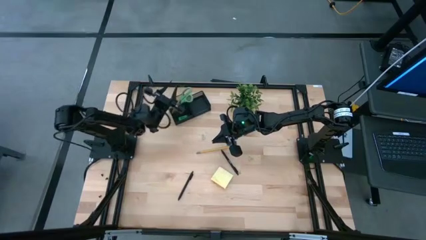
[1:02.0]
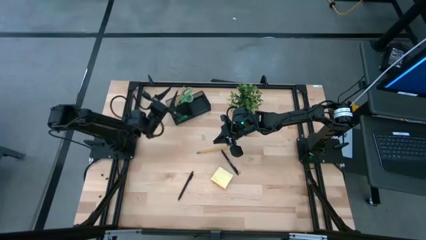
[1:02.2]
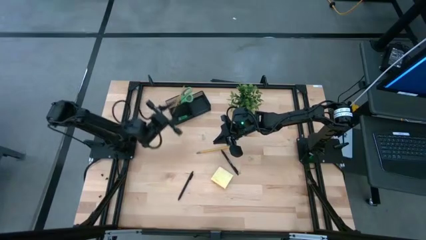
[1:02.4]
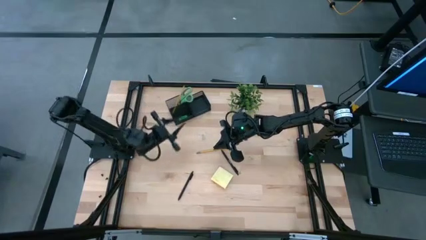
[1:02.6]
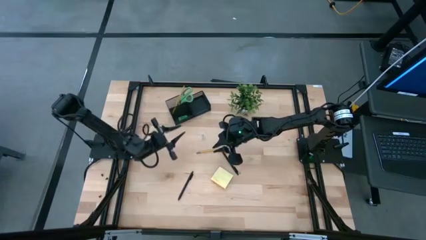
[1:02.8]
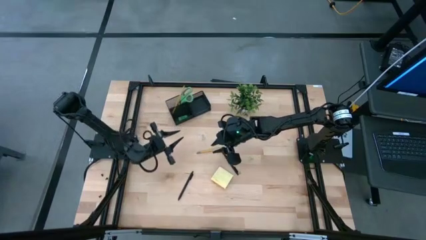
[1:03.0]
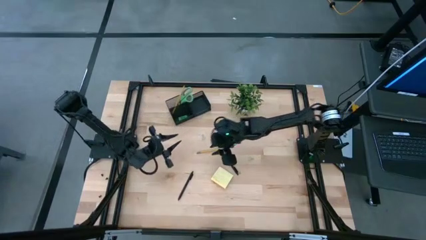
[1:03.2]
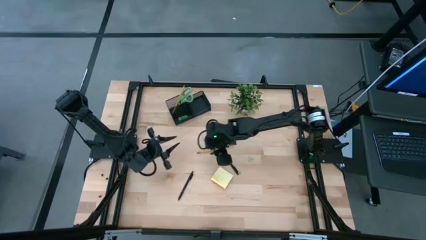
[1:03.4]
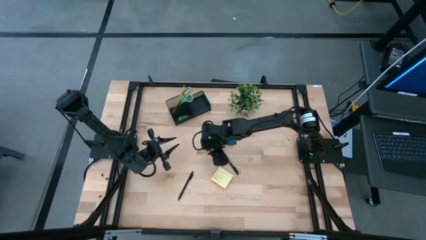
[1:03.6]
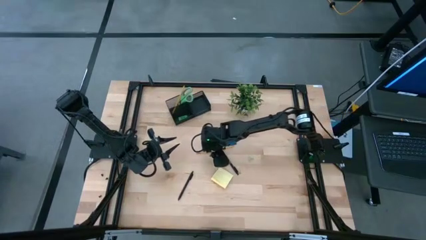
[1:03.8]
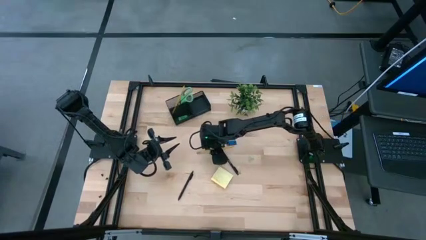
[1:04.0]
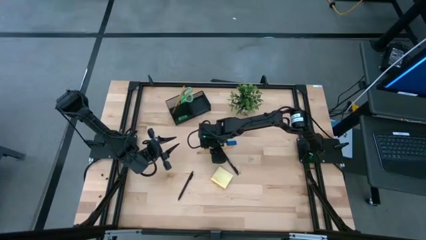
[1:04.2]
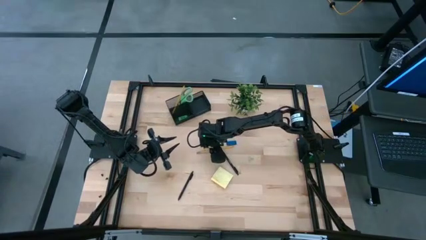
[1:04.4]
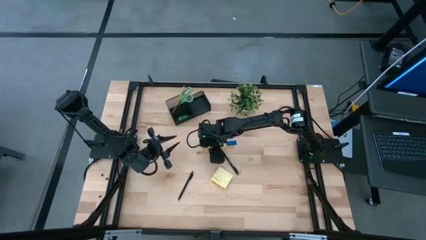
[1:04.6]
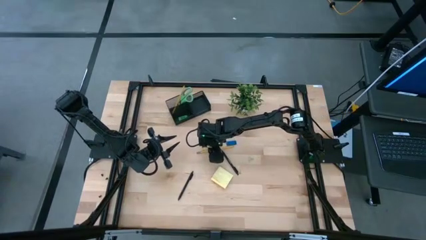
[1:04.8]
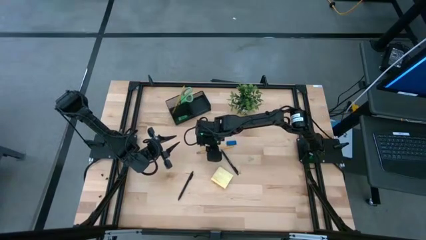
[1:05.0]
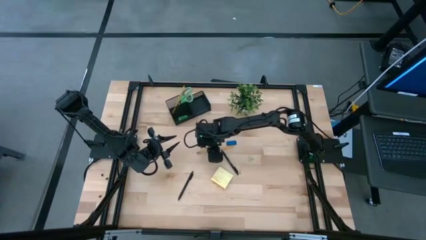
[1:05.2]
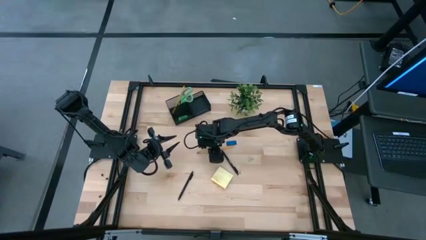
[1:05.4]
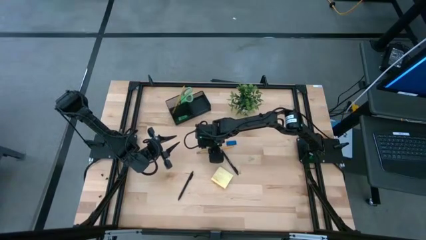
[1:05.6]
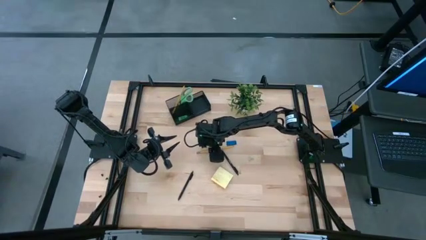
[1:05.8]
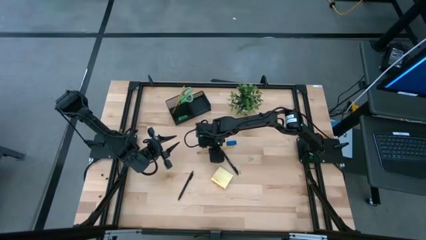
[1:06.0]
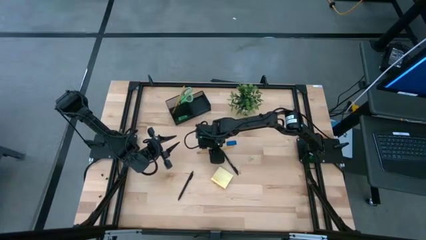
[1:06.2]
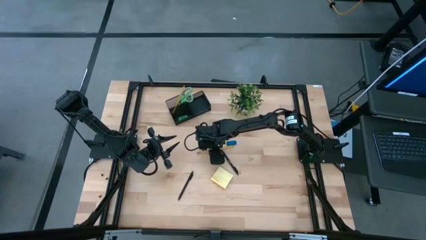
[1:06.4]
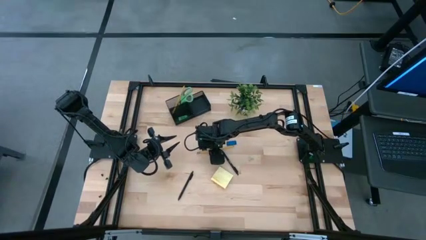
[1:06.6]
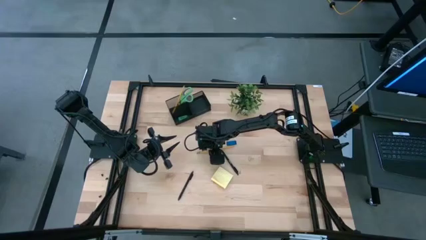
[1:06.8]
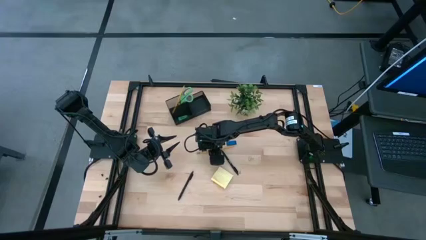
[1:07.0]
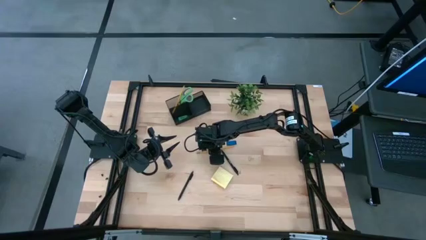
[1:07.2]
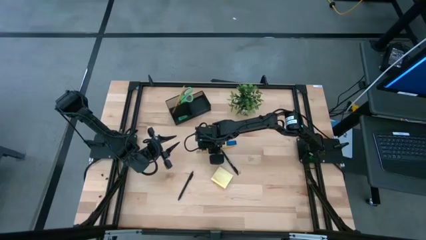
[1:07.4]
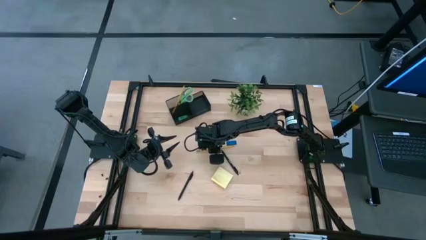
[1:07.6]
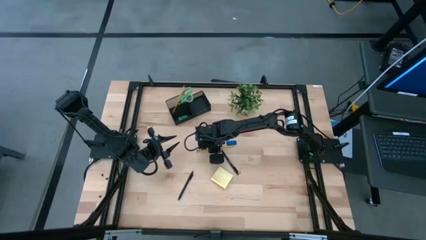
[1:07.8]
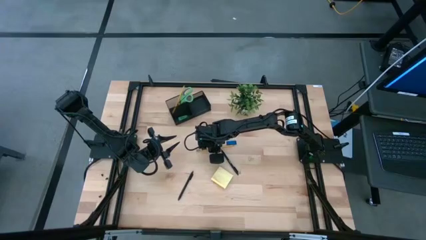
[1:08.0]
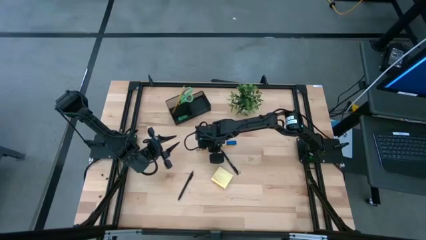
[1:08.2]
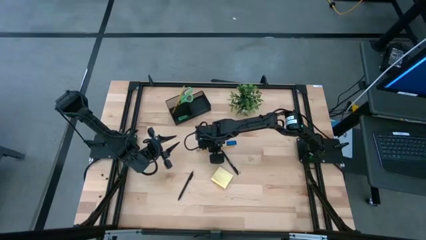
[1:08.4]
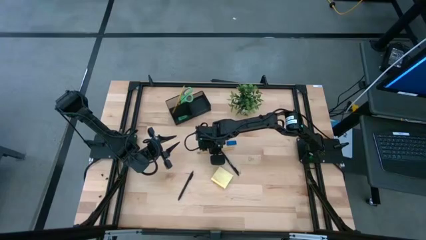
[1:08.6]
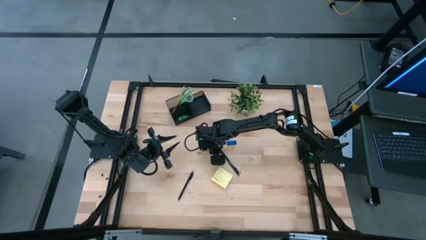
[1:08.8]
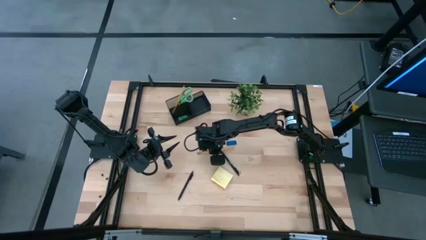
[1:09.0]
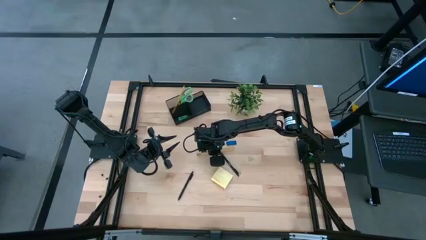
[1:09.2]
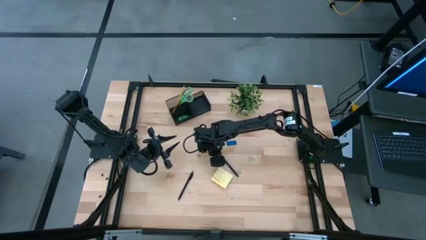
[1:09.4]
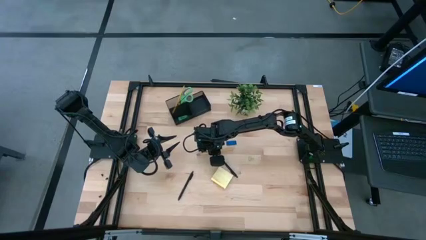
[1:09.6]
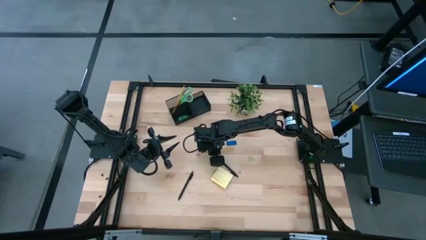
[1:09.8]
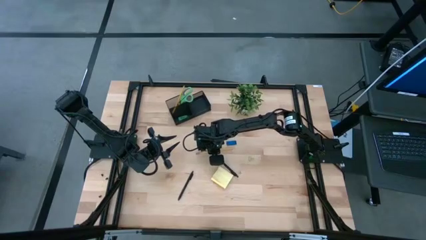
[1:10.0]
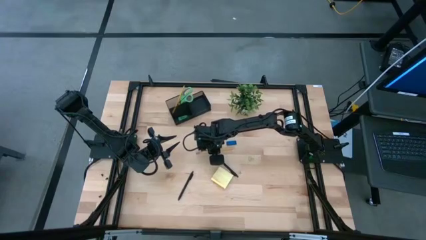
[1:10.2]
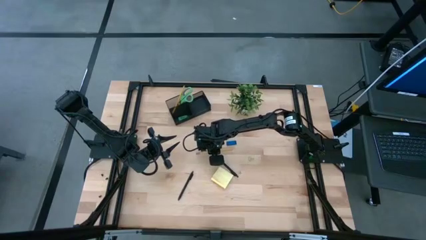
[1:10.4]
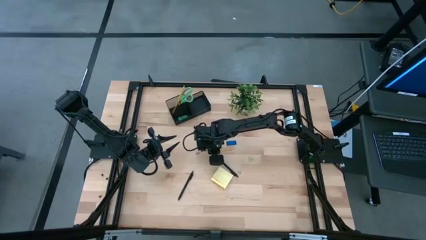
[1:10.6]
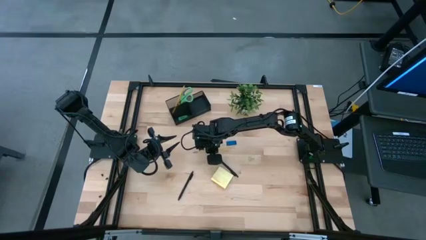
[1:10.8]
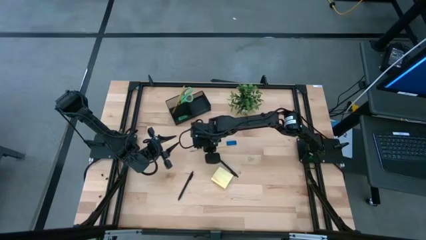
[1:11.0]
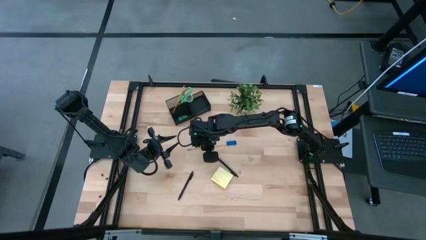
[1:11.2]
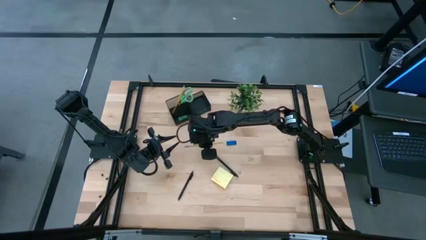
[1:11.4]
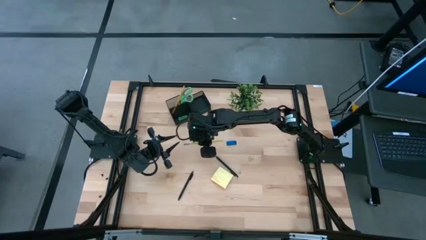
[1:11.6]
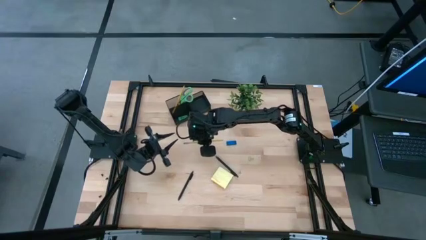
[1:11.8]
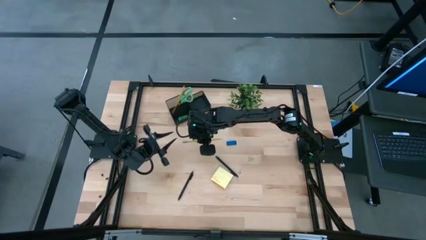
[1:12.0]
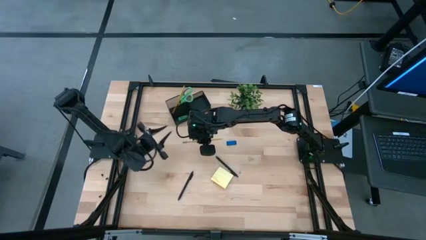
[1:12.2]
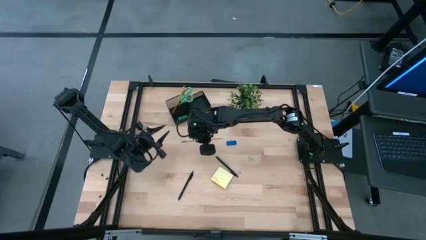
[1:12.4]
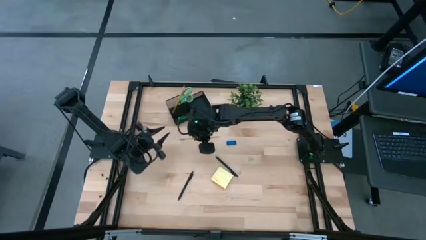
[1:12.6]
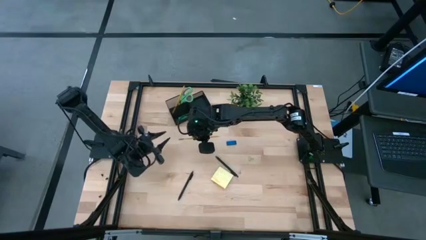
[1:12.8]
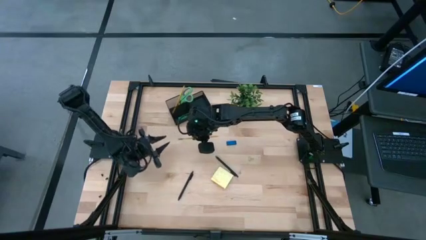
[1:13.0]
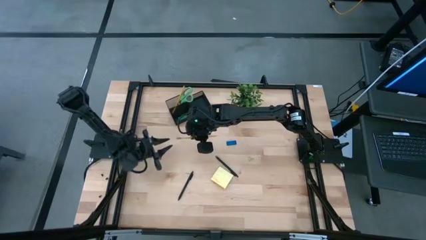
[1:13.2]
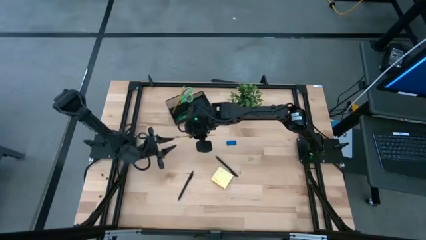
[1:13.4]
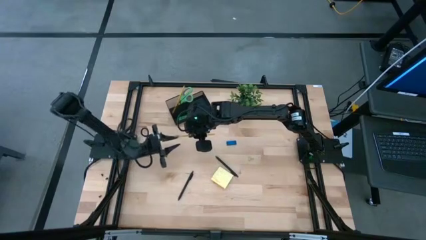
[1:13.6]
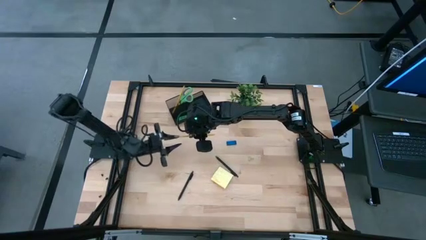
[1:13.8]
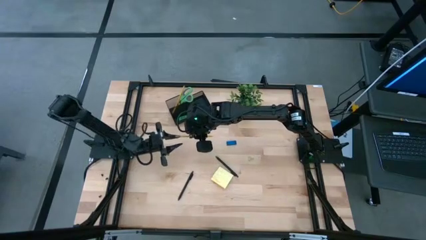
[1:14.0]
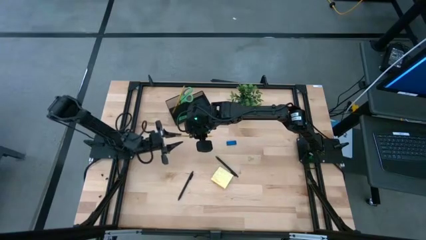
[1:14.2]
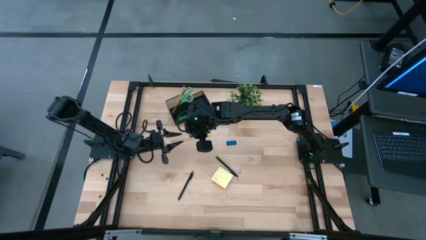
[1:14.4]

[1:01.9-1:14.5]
Task: Pick and place office supplies into organizer
Put the pencil into the desk organizer
